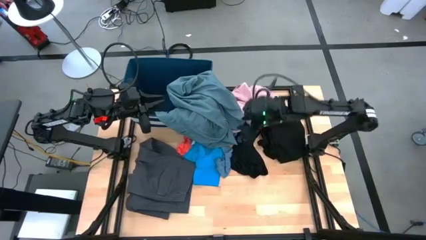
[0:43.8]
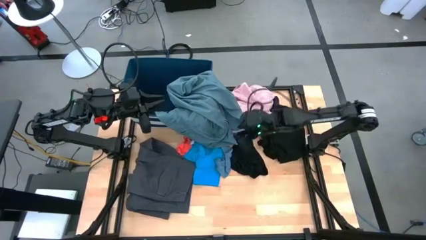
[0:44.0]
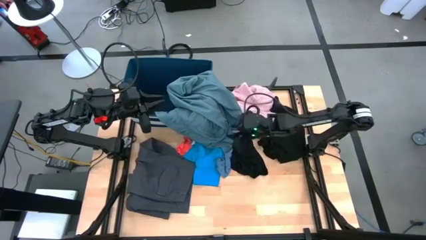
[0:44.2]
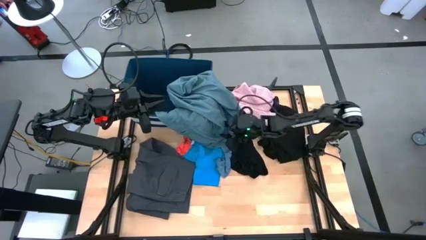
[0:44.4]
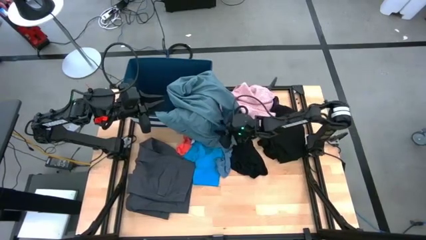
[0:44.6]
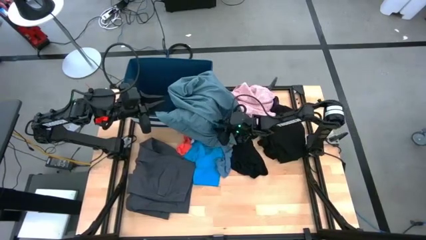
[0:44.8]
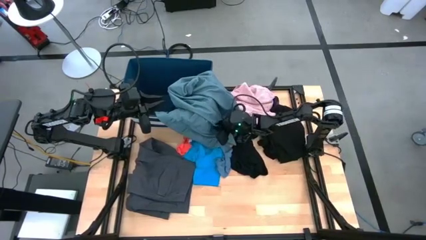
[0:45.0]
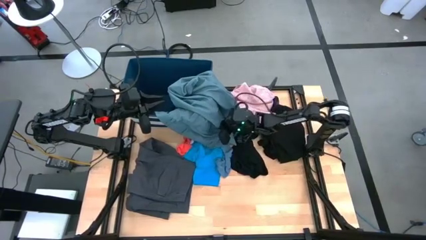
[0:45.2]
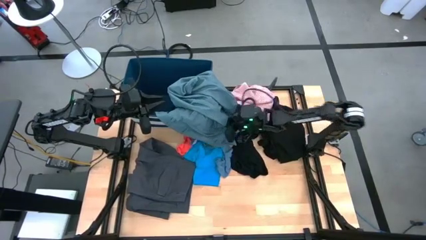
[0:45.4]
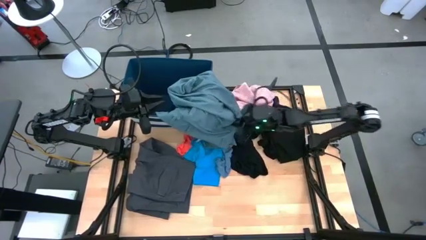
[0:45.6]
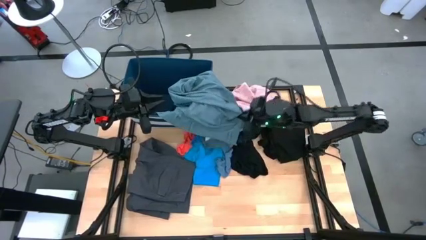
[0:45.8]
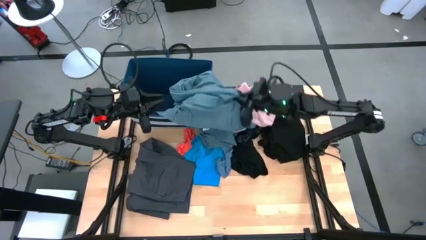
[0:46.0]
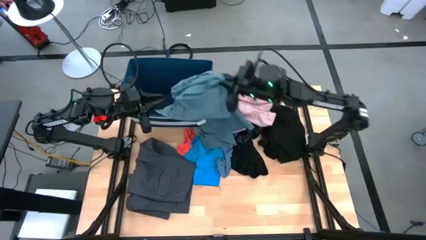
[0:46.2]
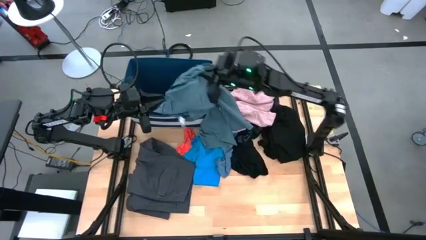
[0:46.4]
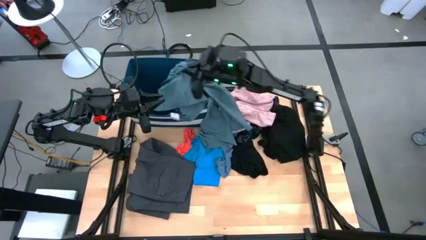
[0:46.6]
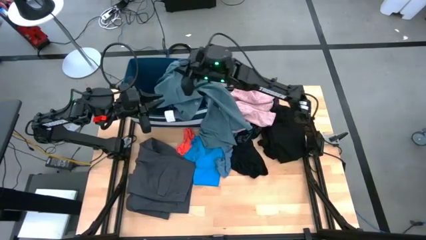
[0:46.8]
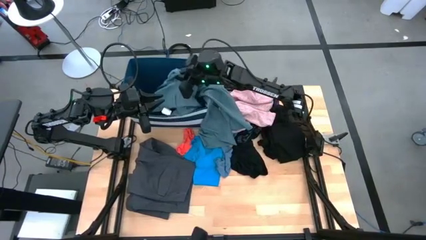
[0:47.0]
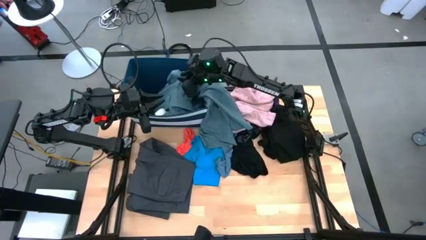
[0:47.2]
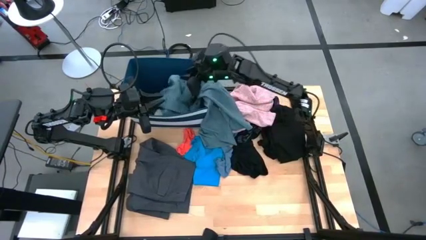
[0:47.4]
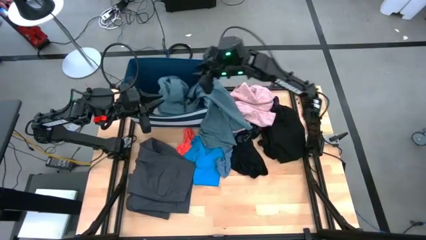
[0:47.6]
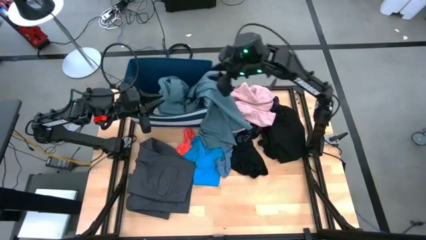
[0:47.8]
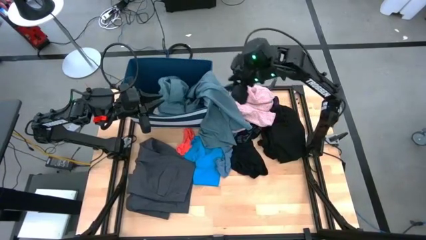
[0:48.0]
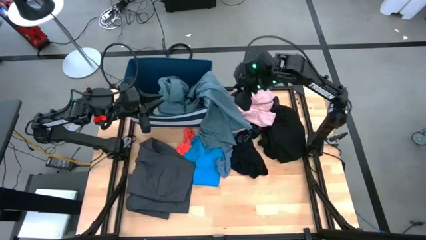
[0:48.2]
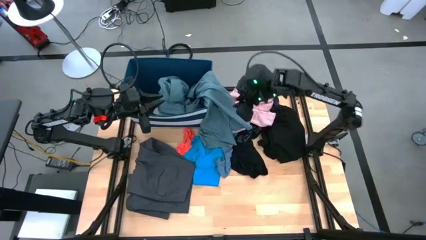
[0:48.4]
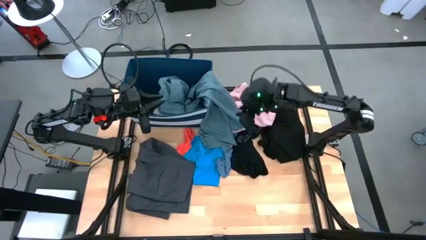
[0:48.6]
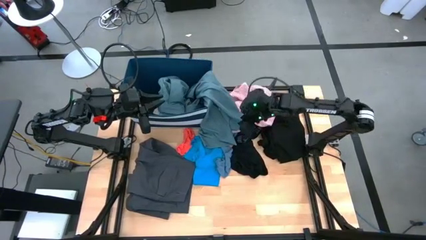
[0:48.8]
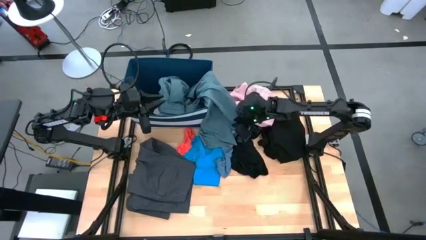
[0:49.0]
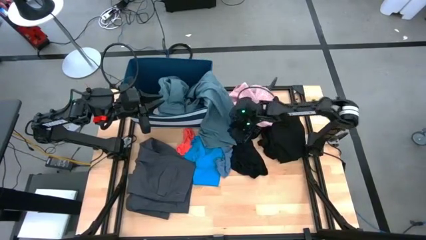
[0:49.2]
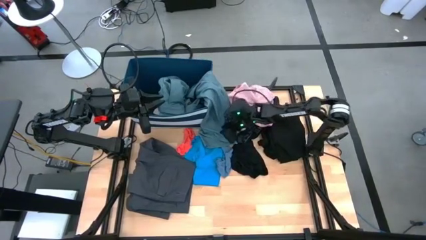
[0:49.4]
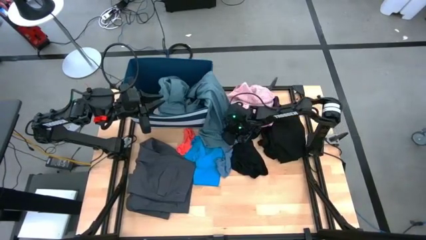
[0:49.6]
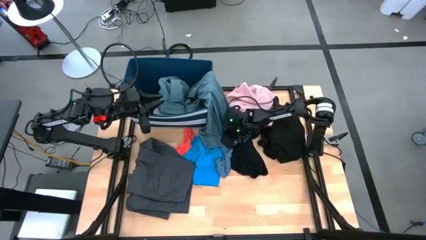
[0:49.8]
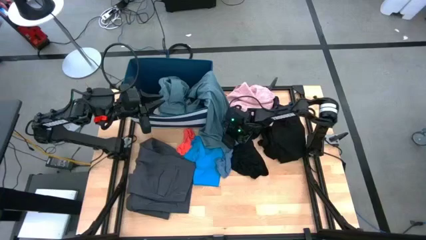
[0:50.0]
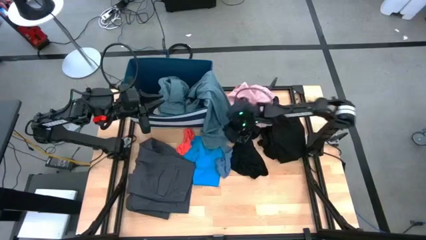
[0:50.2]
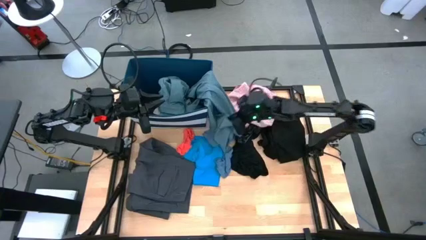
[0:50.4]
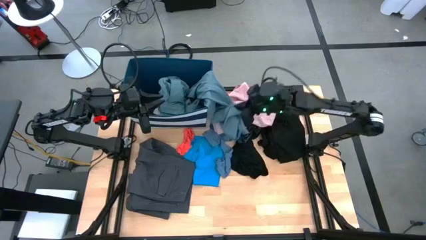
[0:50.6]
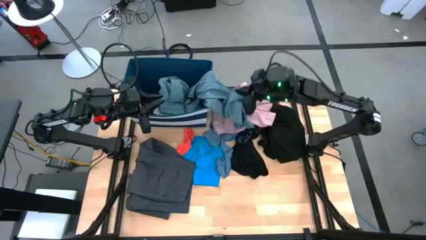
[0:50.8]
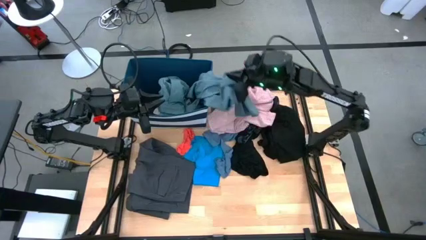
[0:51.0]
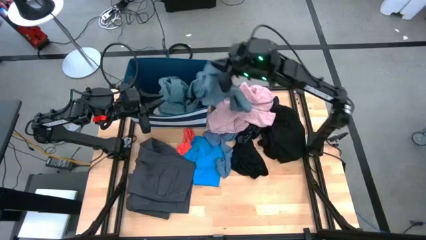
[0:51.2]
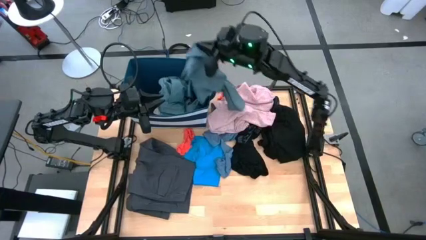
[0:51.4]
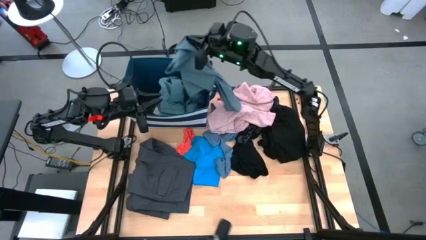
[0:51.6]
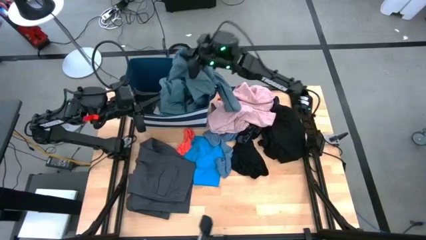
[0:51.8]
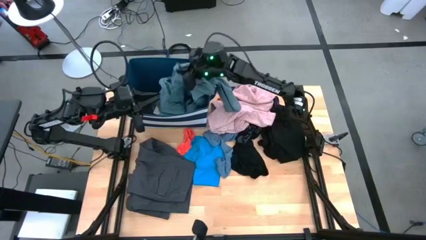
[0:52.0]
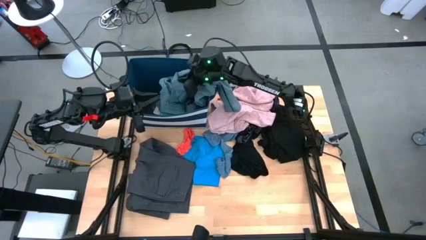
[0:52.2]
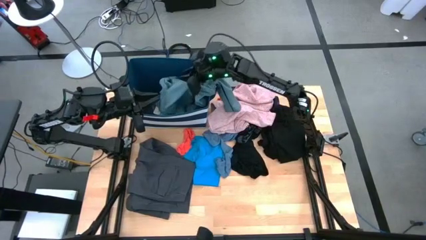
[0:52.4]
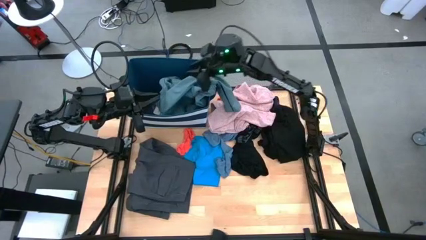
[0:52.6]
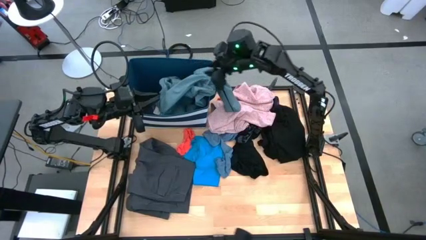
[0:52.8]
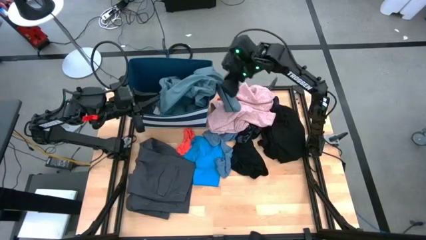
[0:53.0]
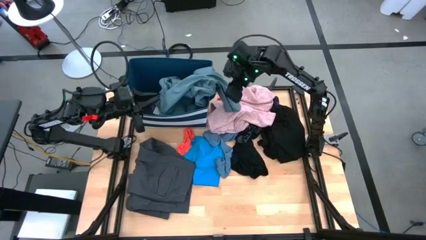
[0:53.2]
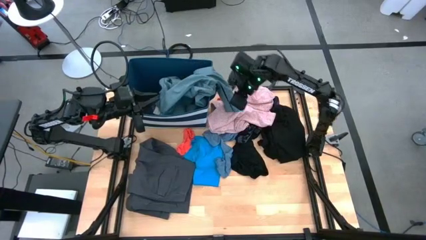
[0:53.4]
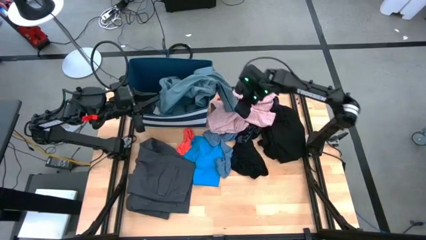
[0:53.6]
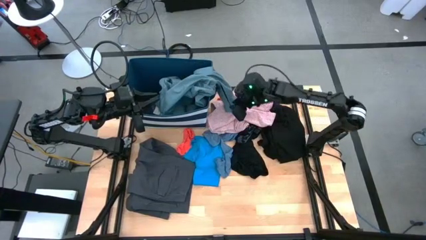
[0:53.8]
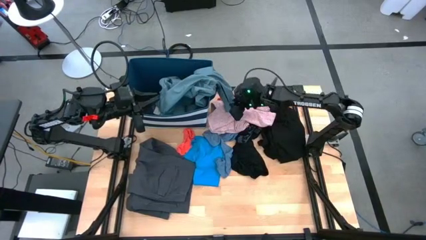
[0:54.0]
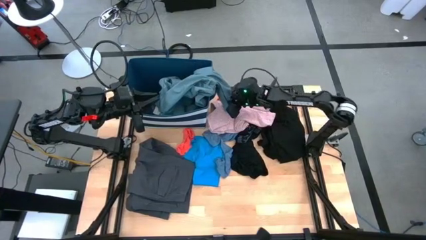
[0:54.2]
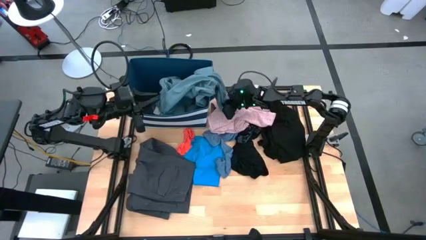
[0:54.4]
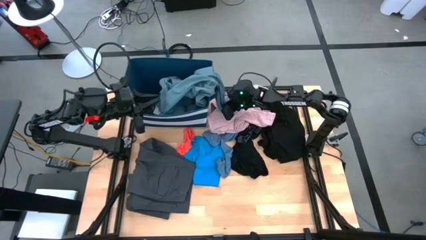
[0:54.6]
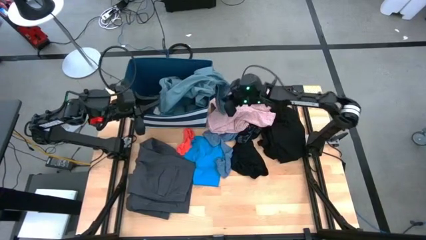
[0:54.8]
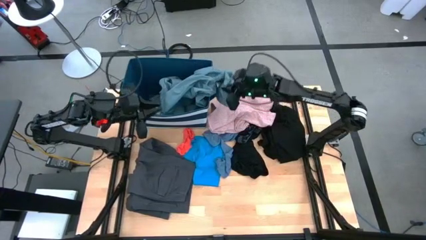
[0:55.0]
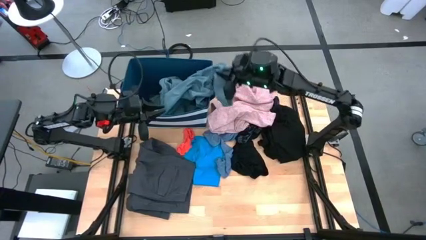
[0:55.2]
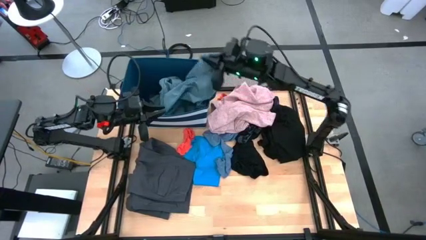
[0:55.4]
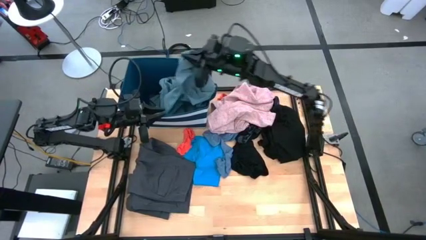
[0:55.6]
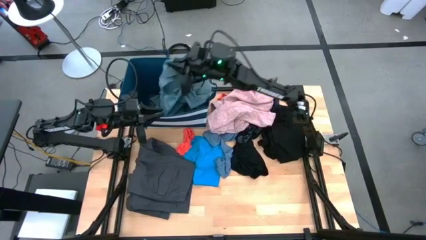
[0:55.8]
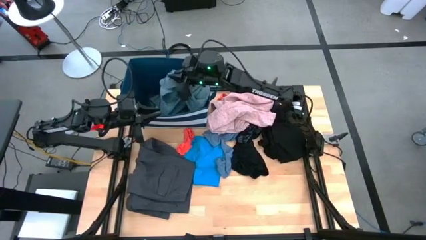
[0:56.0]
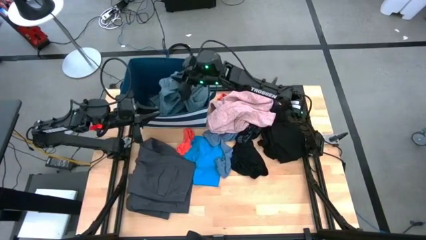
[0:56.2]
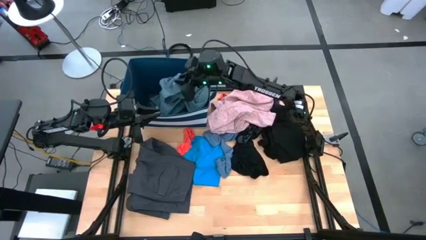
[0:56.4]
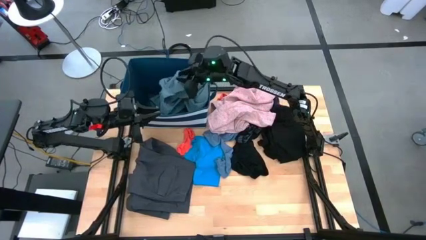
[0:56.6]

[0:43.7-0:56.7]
Task: Sort clothes
Put the blue pants into the blue laundry bin
